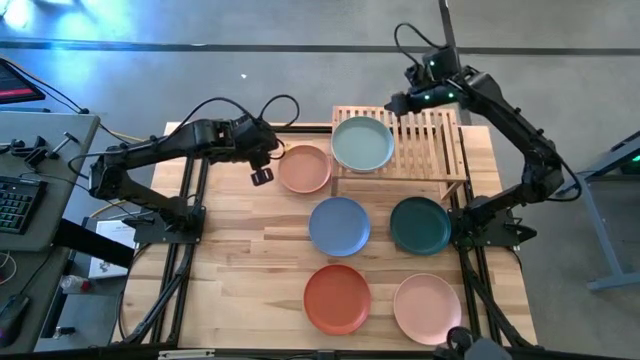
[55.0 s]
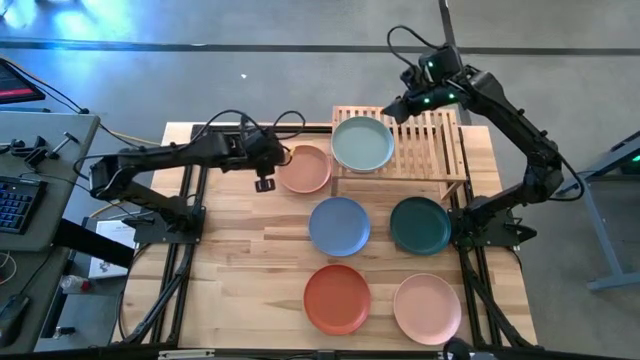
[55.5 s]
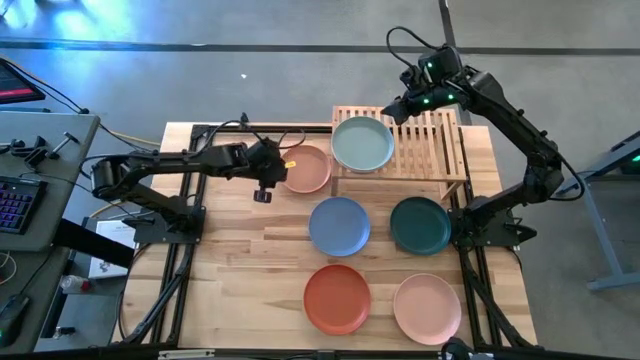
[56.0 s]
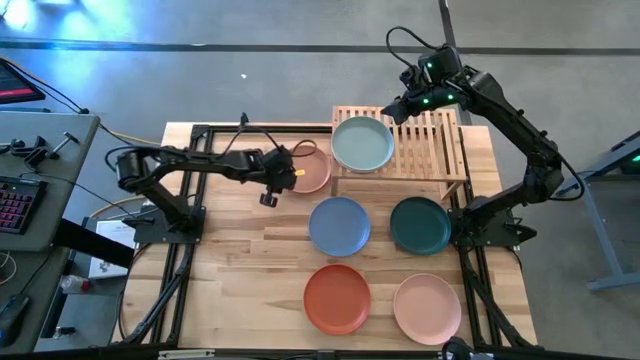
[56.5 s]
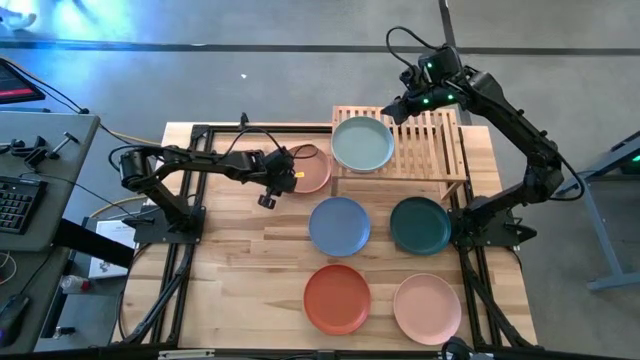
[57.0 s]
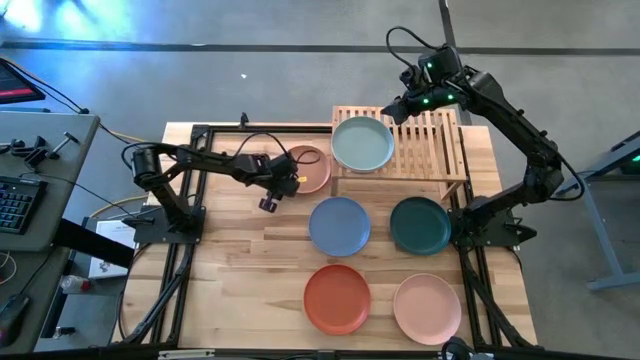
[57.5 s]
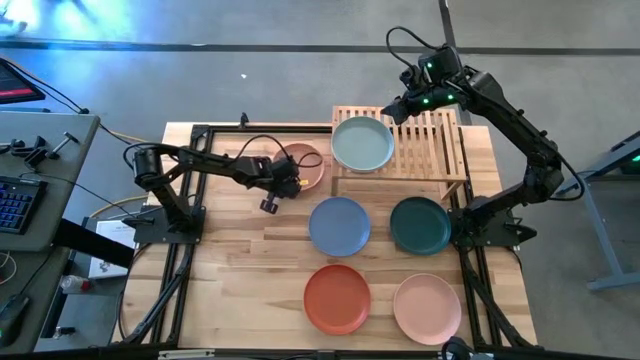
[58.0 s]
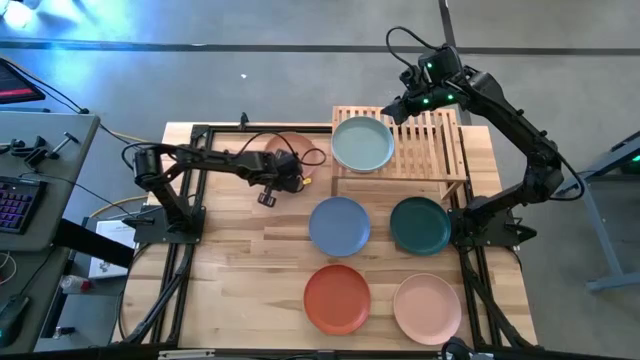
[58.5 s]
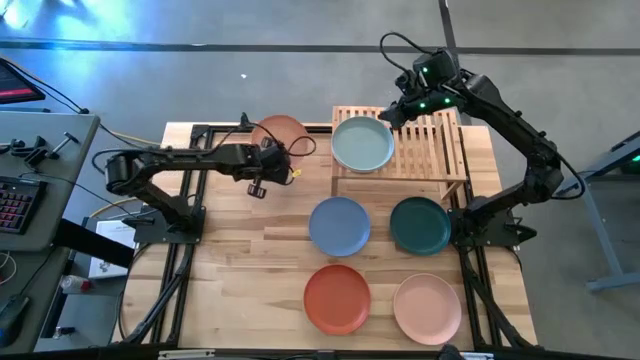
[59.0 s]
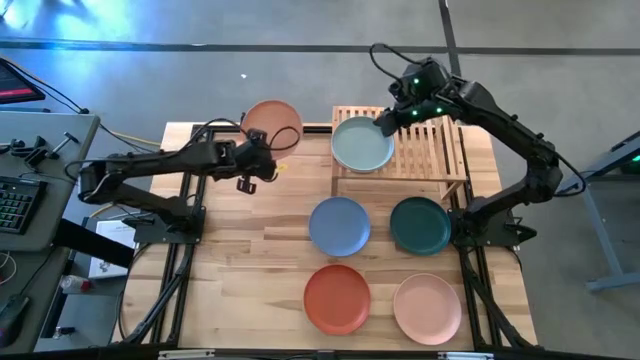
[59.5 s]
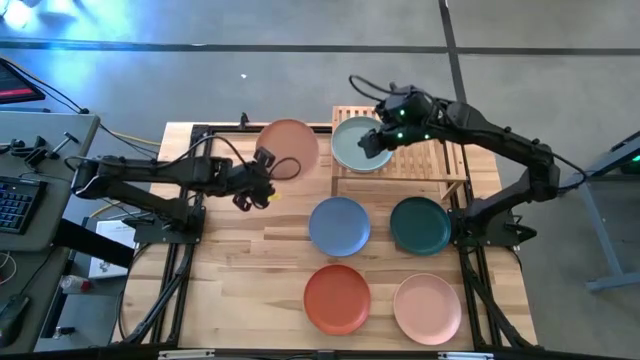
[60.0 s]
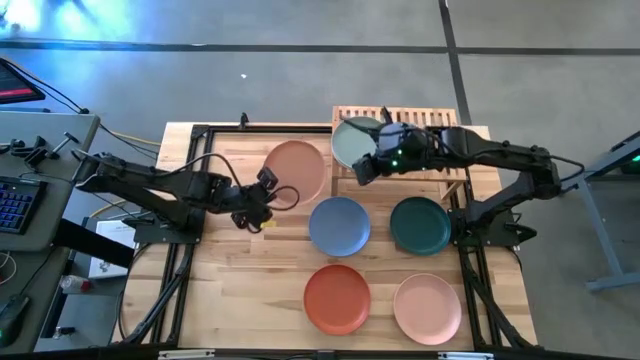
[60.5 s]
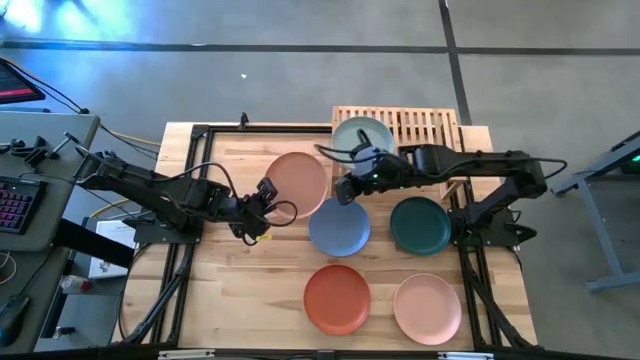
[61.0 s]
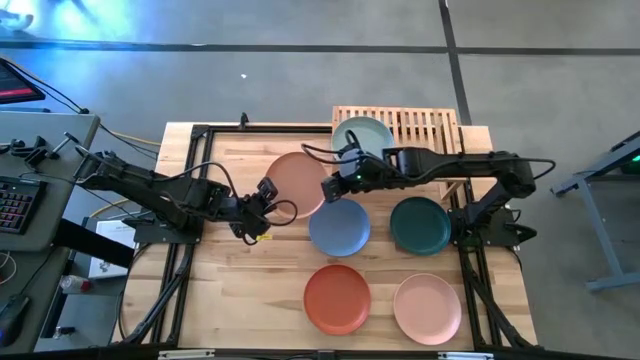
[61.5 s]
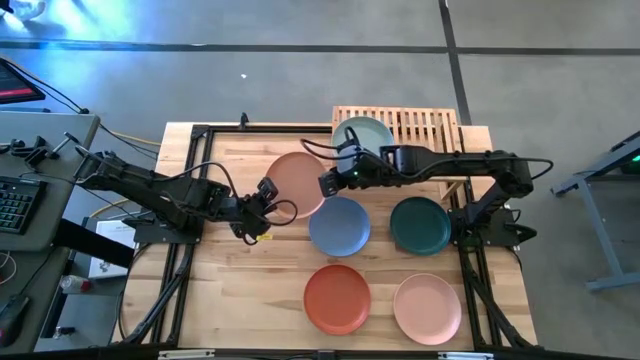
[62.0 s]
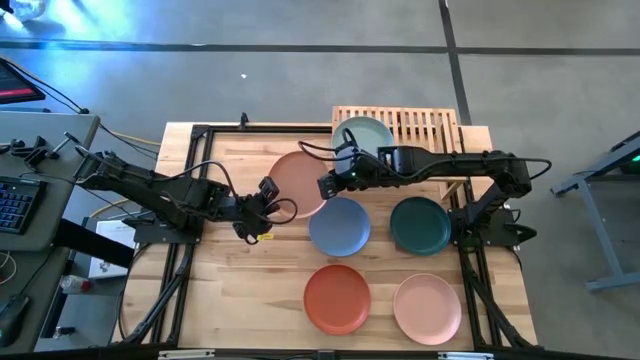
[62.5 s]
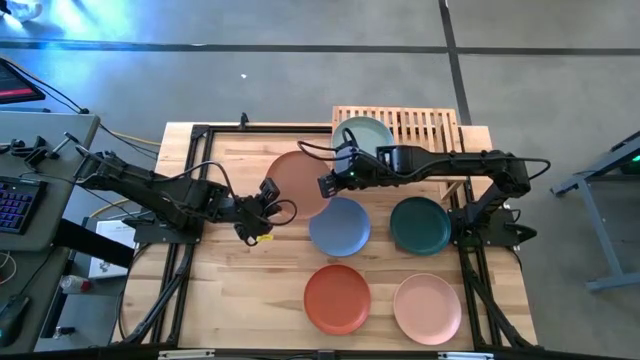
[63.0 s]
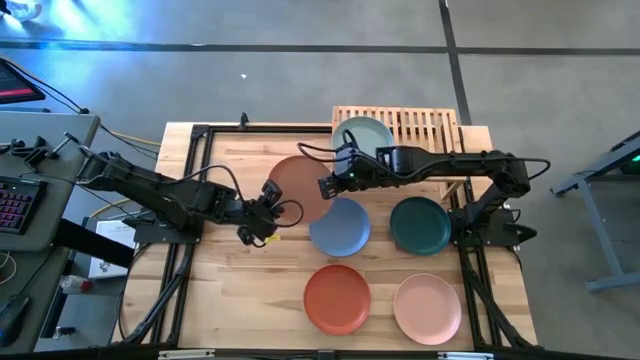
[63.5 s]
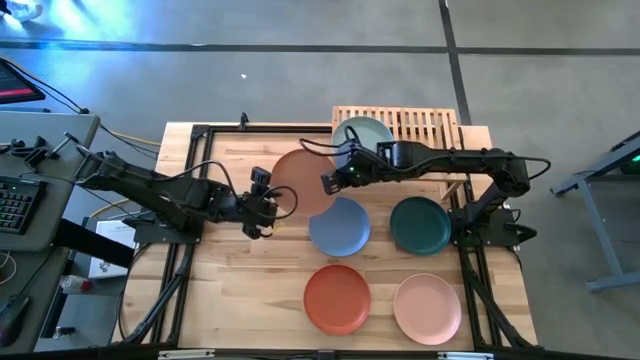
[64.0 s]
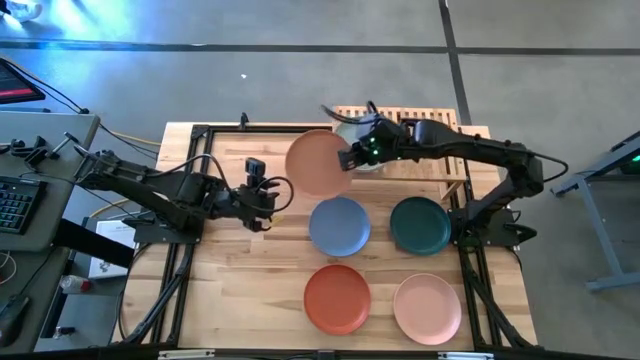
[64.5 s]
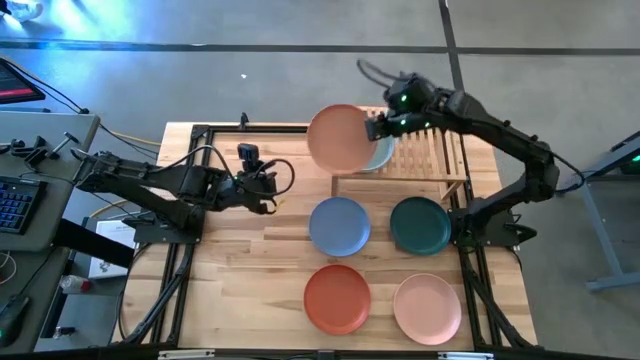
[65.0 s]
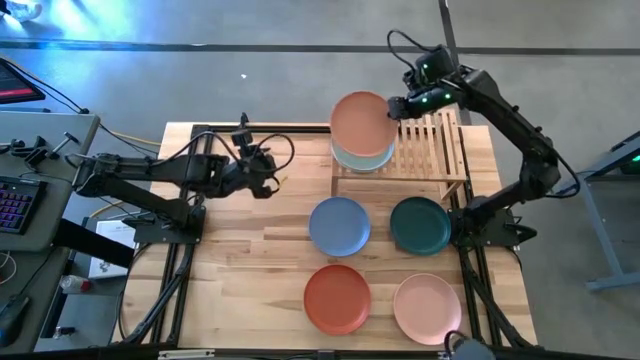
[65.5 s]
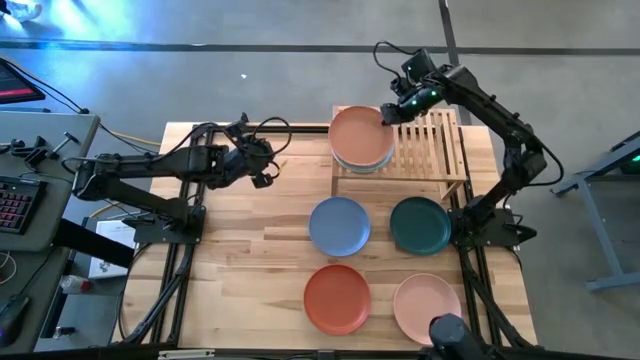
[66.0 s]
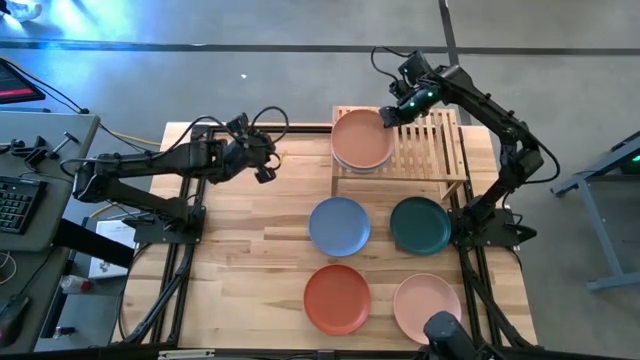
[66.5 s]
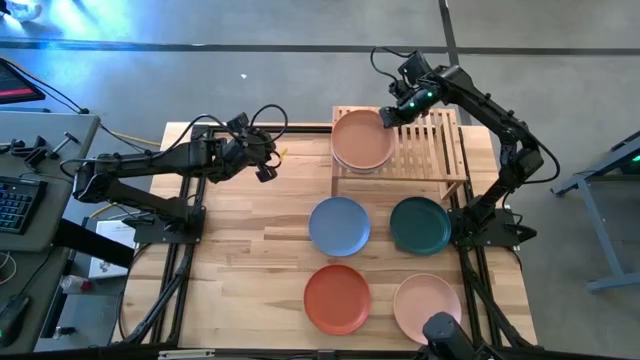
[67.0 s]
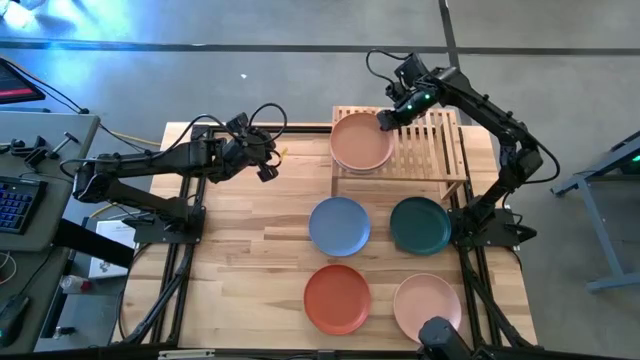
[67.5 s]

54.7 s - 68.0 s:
Task: Place and stack plates onto a shelf
Stack the light brown plate on top of the light blue

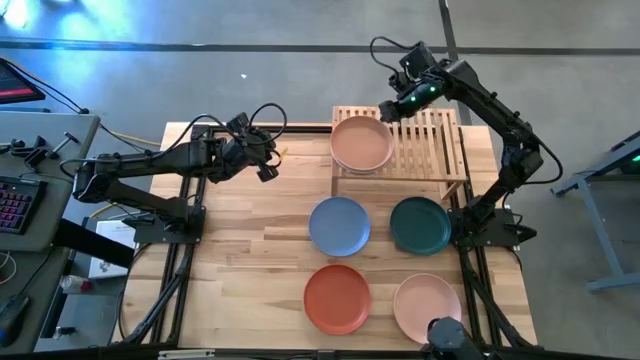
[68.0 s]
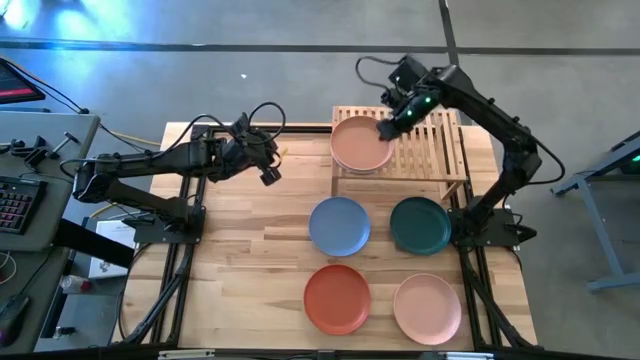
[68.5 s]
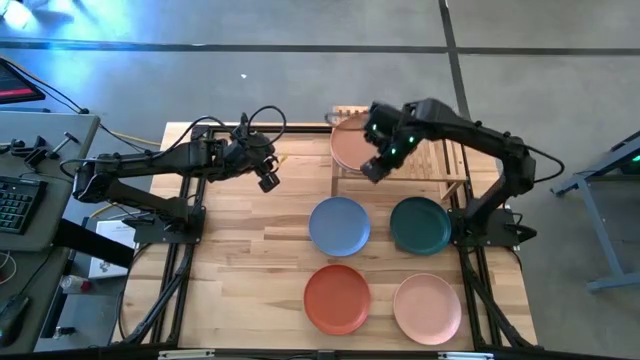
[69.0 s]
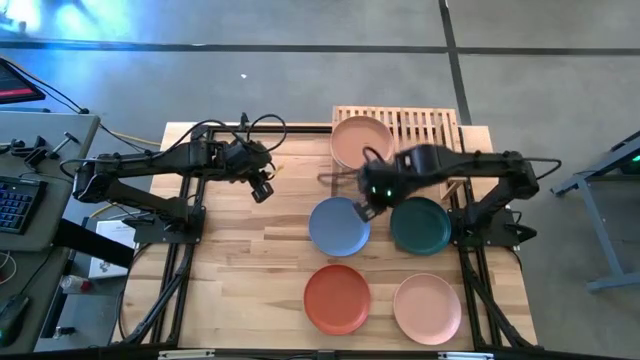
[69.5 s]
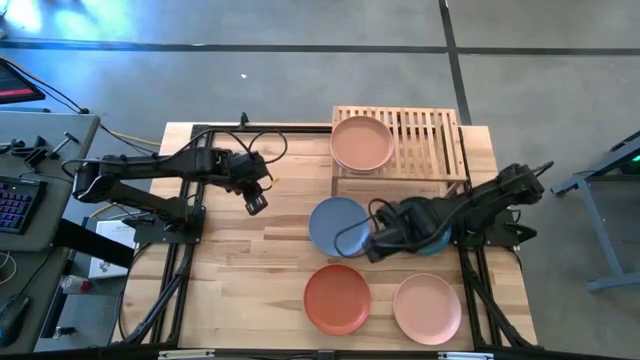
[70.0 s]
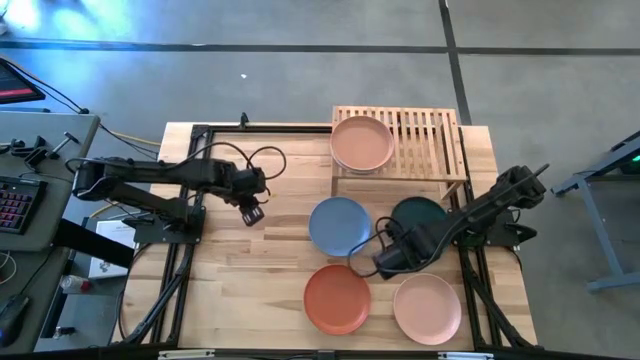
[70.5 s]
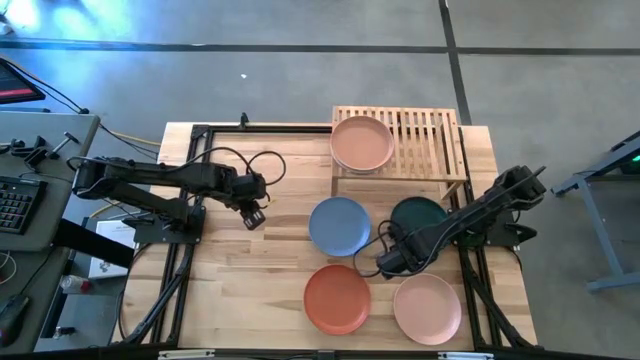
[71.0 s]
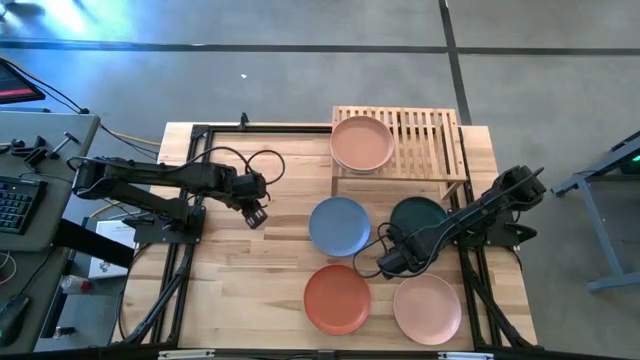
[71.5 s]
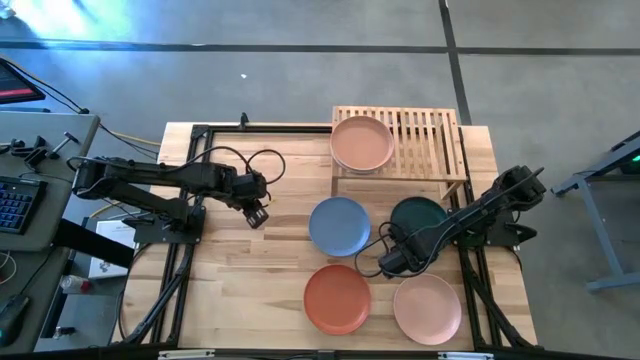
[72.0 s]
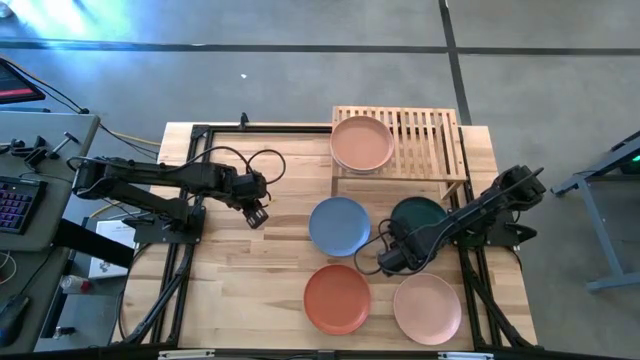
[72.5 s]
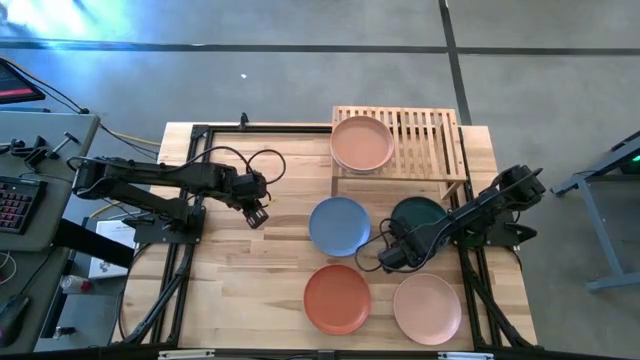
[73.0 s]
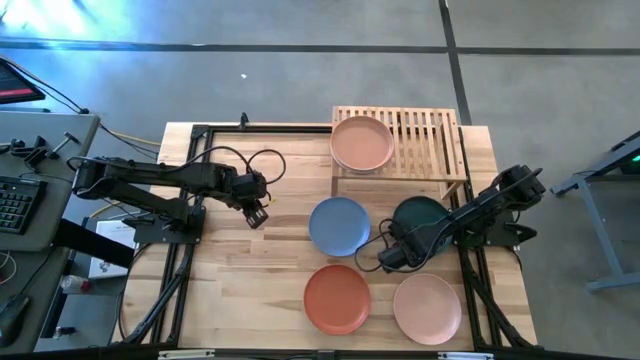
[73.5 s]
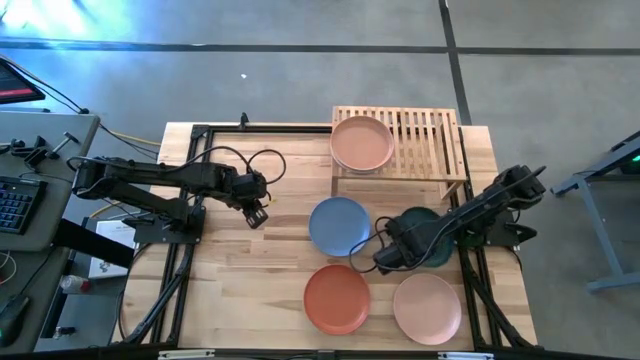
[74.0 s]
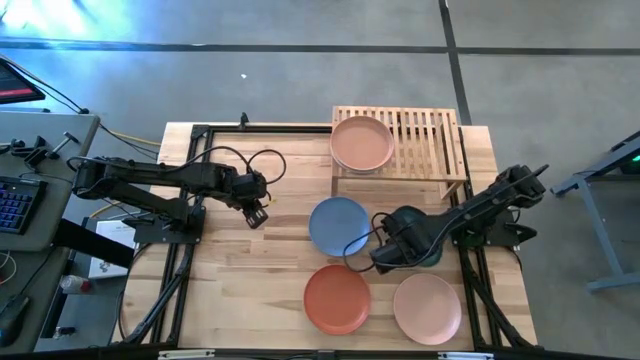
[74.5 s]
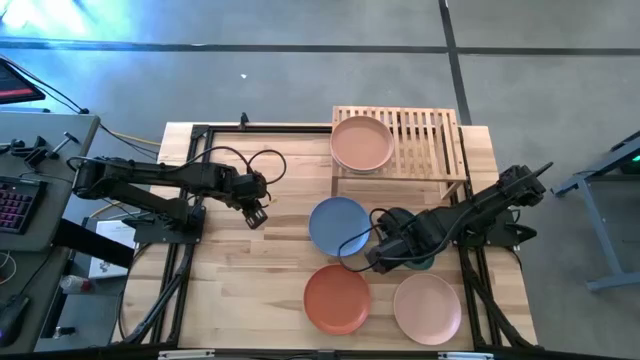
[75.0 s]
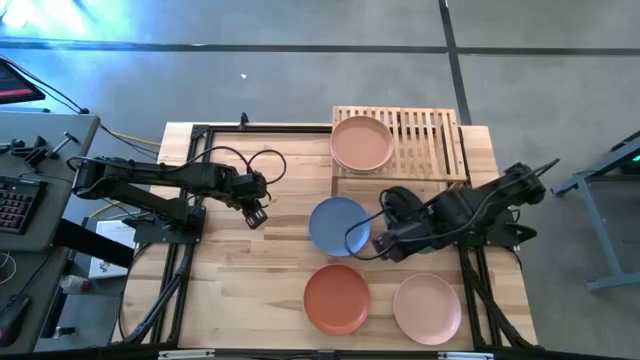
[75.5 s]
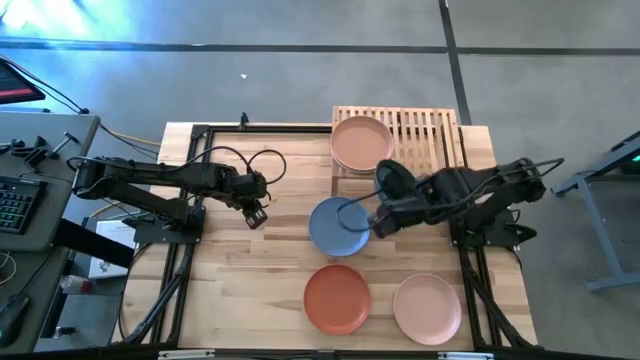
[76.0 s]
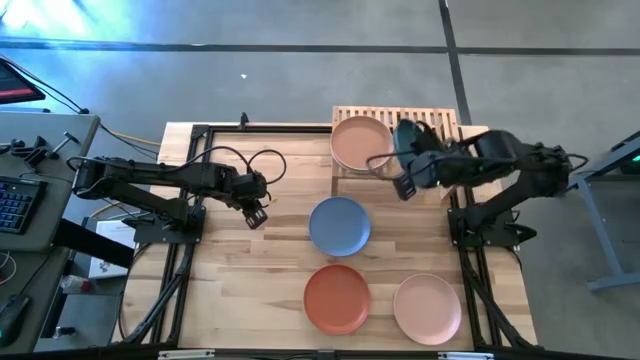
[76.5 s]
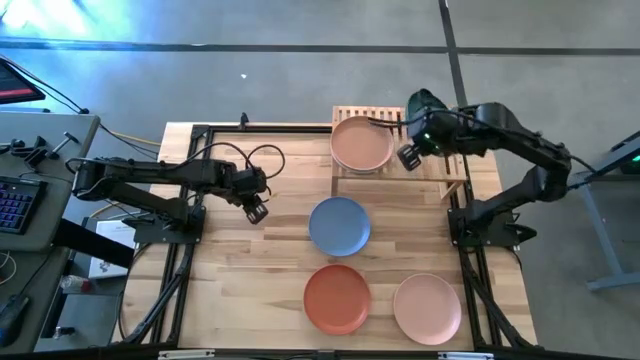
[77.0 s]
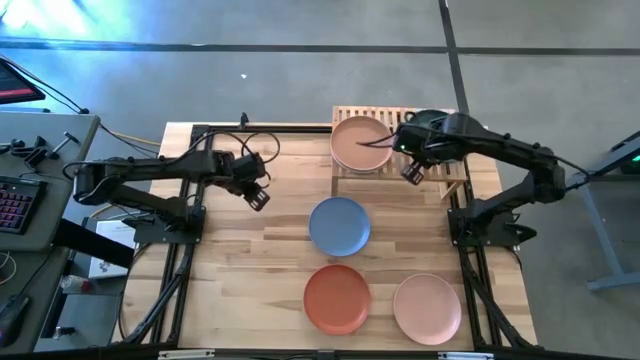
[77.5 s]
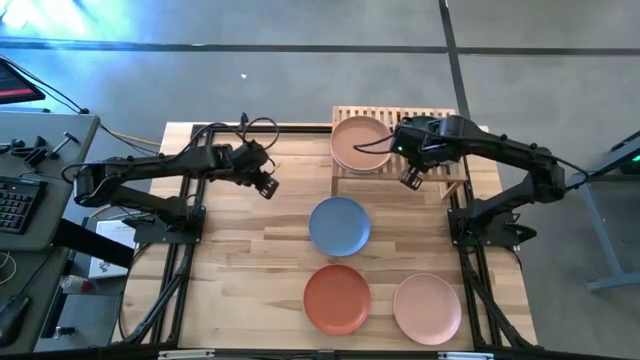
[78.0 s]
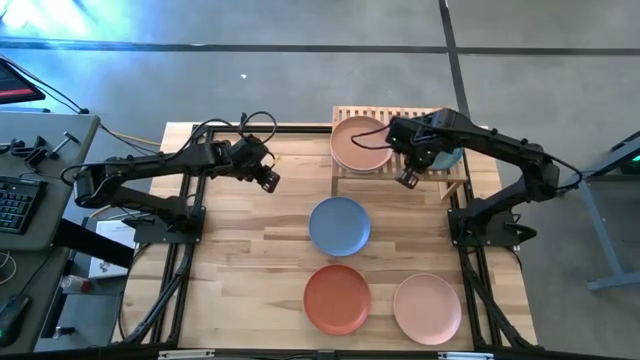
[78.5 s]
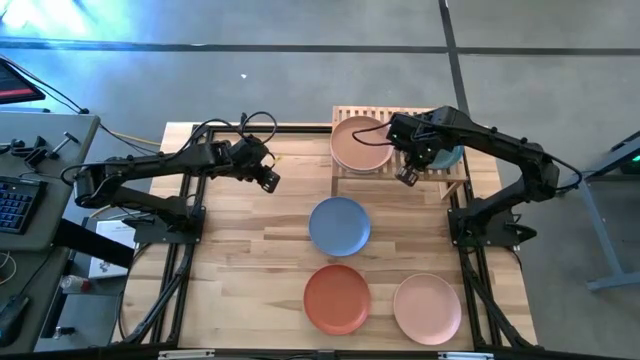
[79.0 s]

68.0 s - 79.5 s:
Put the green plate on the shelf
